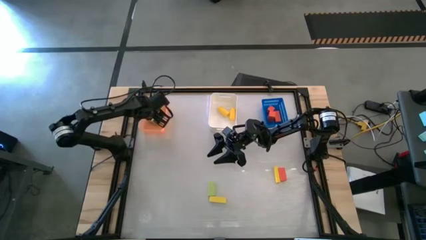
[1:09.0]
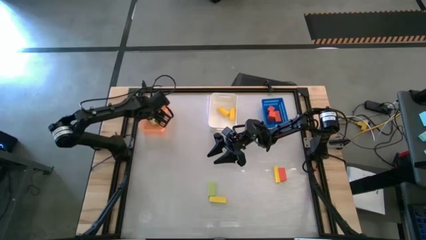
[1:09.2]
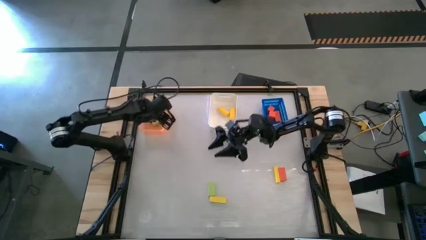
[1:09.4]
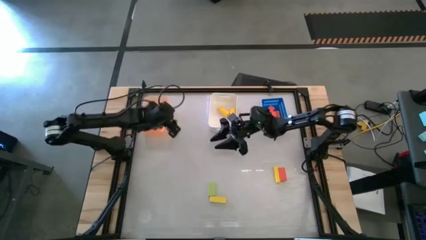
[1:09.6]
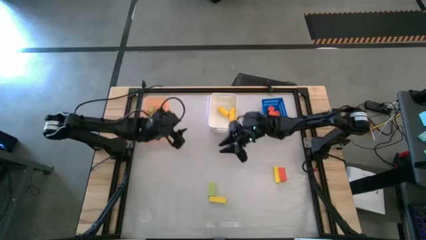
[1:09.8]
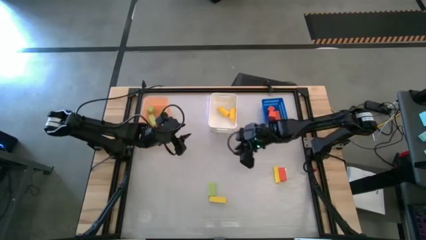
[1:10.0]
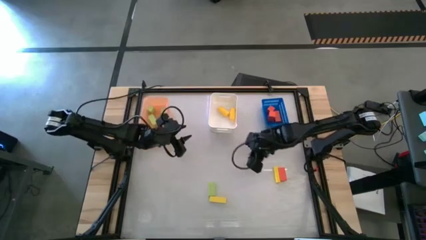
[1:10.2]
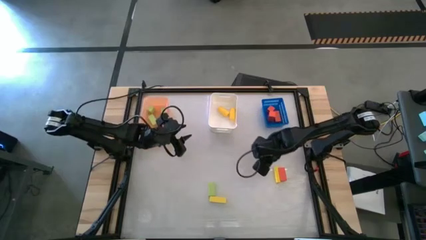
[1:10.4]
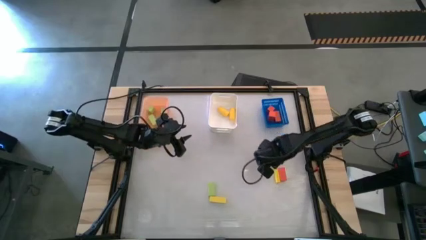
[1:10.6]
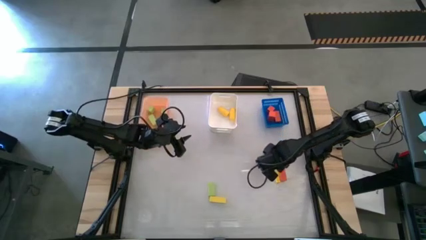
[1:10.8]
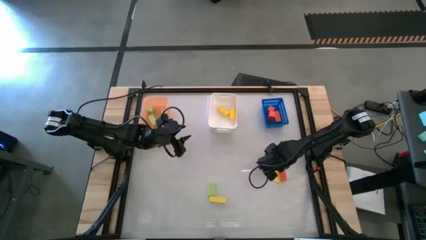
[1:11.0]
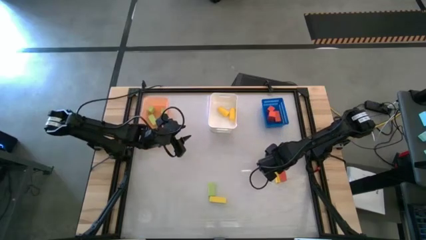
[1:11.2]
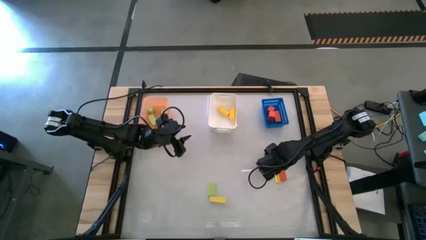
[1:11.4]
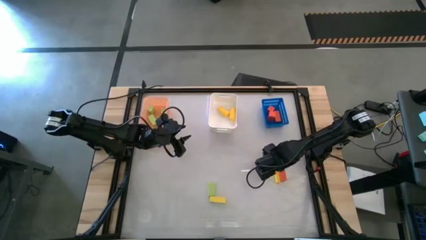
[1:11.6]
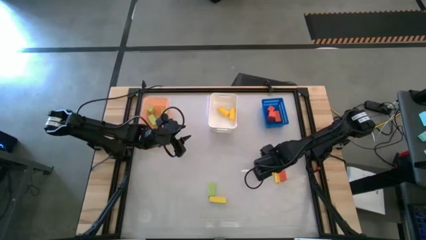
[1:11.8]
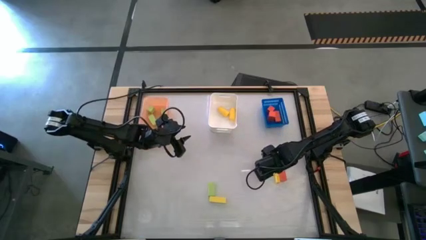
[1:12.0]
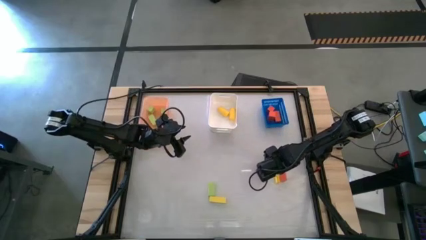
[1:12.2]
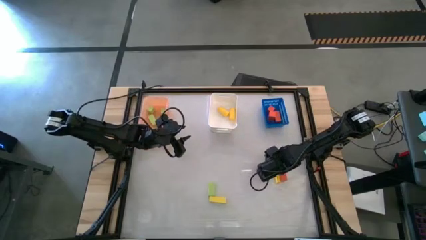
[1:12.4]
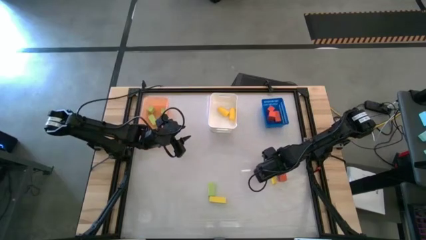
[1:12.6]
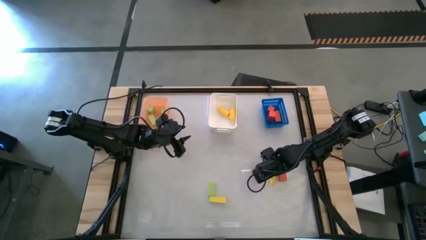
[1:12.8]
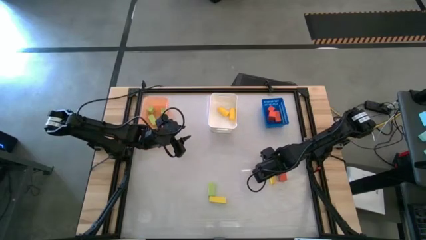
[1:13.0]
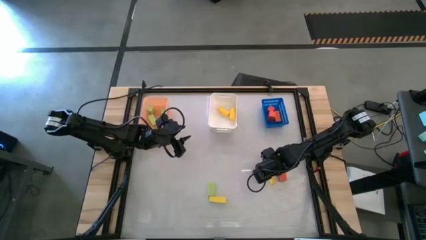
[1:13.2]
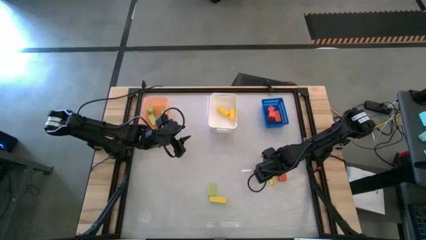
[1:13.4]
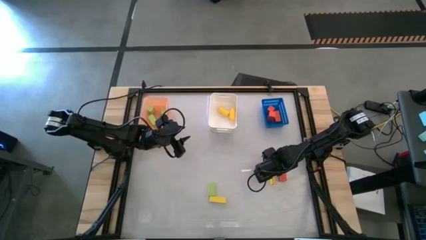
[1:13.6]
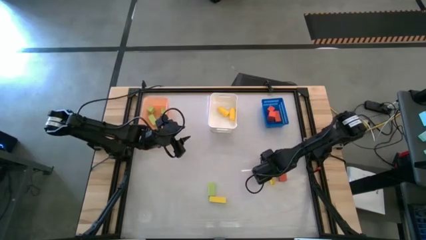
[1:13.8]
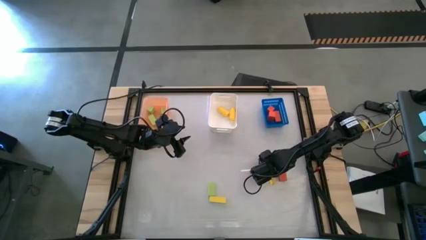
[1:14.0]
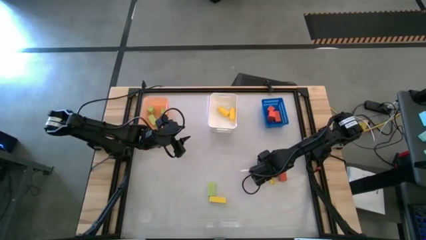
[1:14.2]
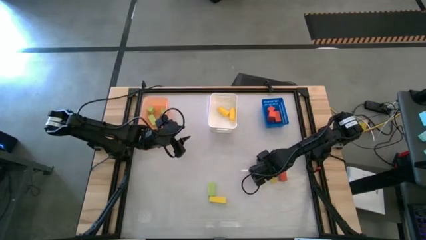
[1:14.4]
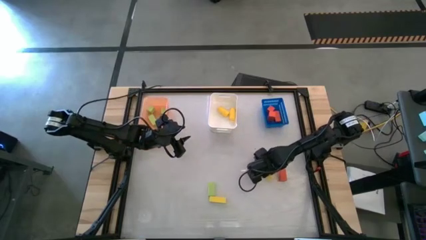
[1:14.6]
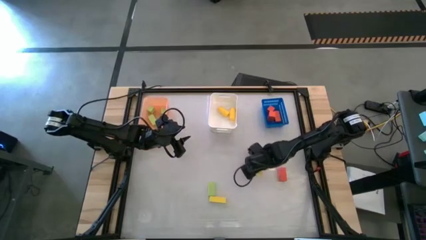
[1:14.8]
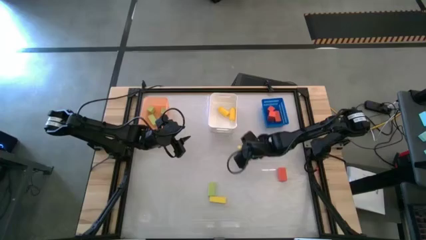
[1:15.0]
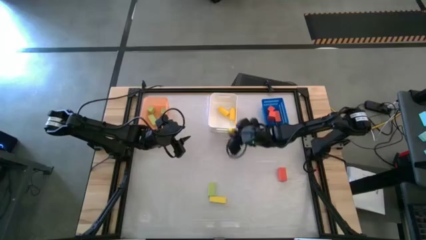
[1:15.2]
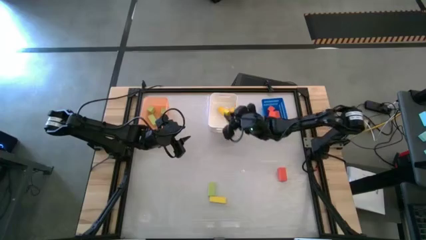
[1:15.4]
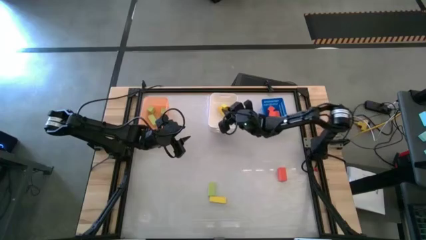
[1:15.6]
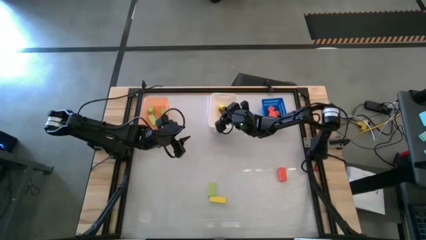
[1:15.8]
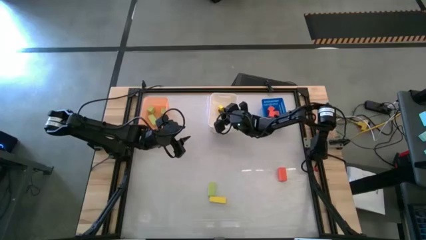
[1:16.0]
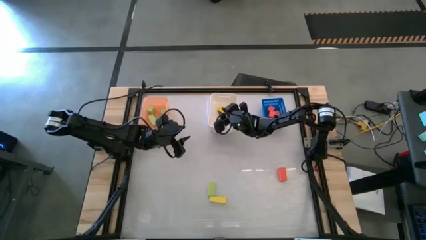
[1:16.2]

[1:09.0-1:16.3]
Task: Sort & place blocks by color
Put the top yellow block into the white bin

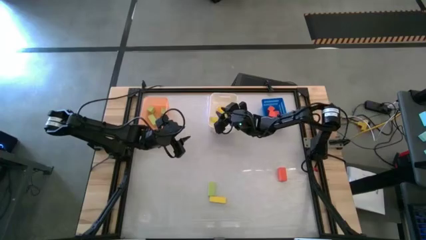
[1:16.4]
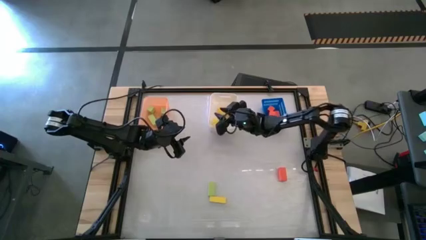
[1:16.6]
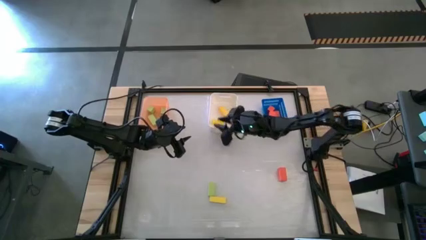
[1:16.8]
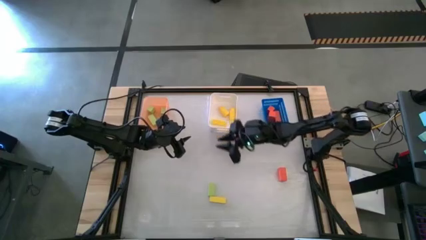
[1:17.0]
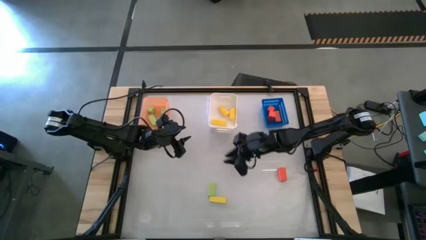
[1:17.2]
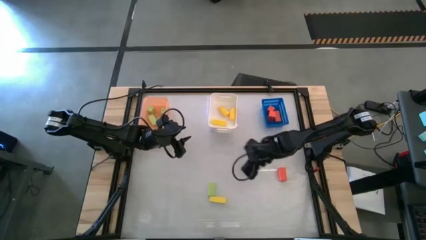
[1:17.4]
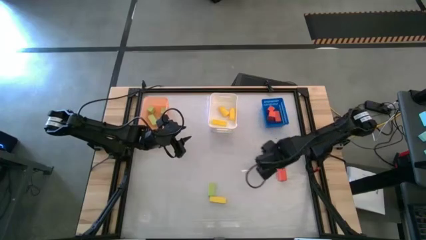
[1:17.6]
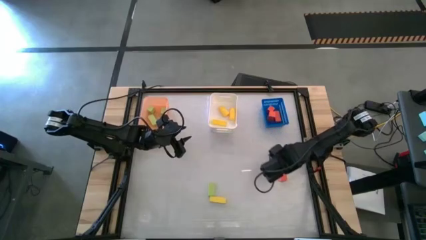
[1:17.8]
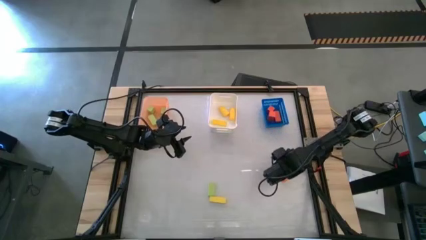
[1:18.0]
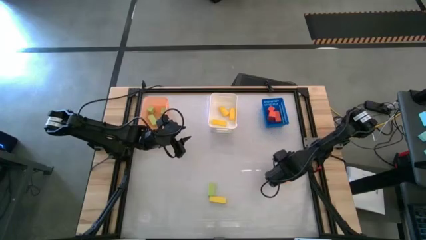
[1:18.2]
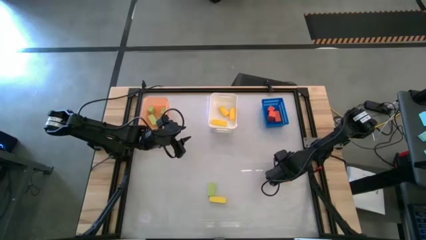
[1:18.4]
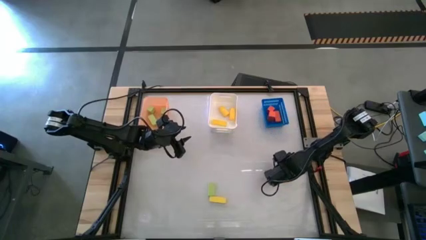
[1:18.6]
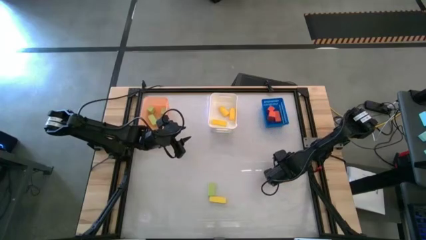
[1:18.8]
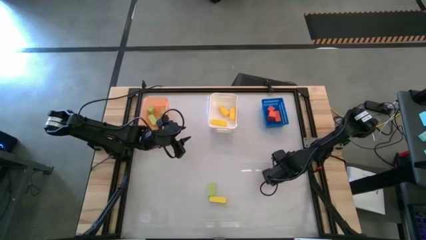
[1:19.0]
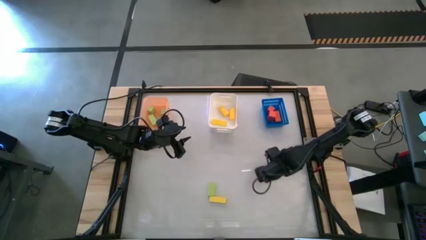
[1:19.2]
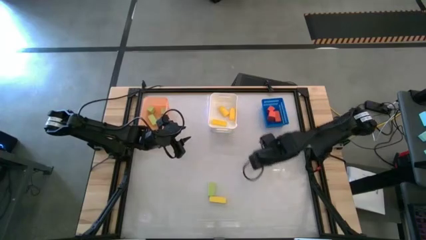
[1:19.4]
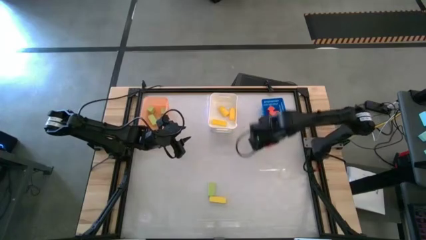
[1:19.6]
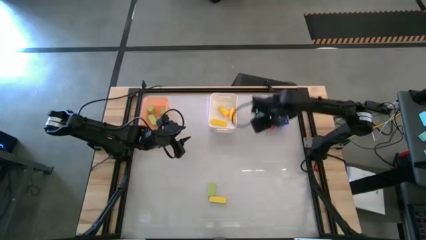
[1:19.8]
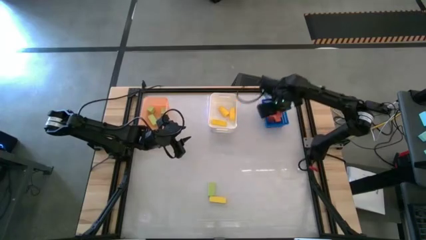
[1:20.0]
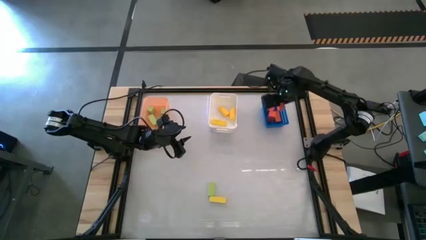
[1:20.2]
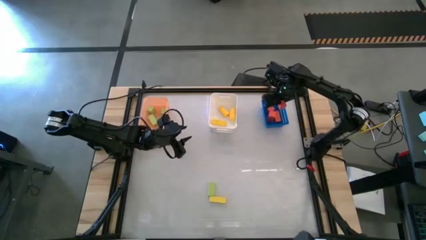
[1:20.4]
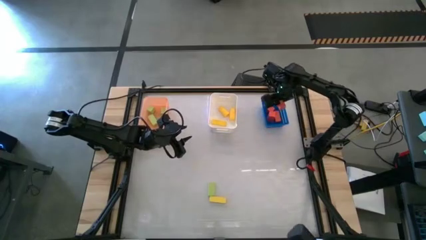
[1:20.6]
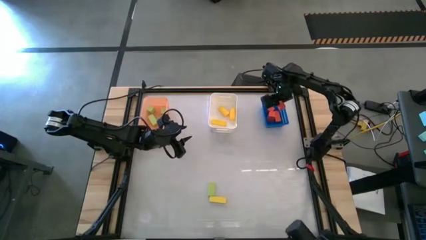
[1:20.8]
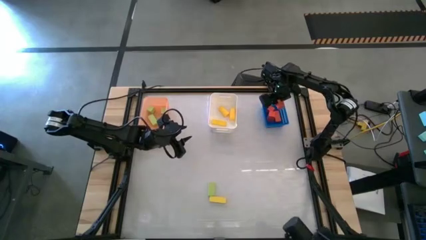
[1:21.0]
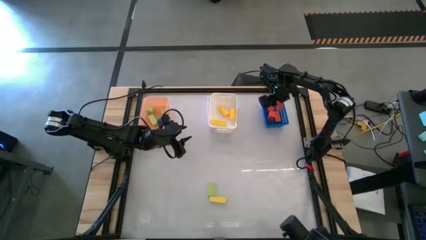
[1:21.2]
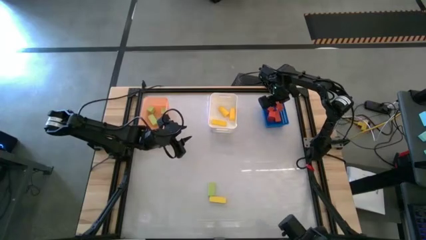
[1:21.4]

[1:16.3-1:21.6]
Put the orange block into the blue bin

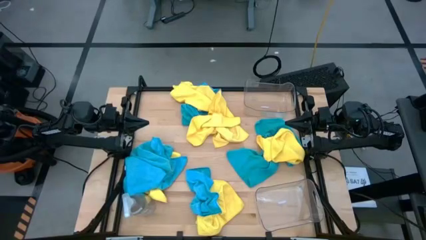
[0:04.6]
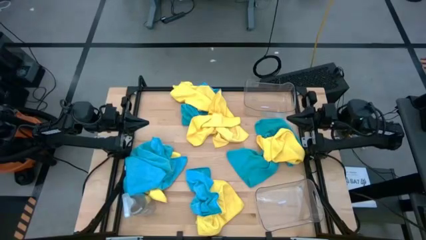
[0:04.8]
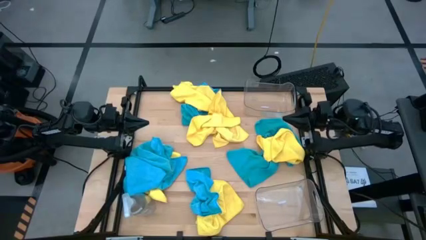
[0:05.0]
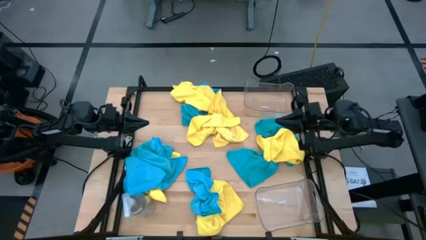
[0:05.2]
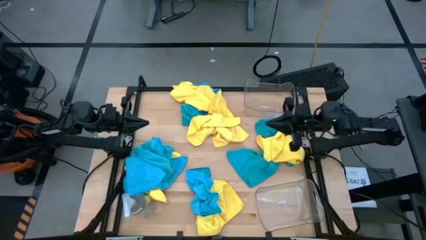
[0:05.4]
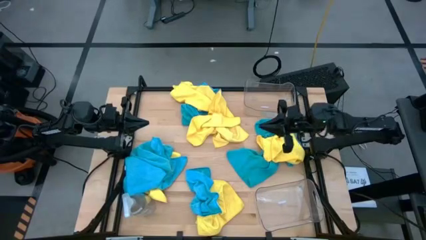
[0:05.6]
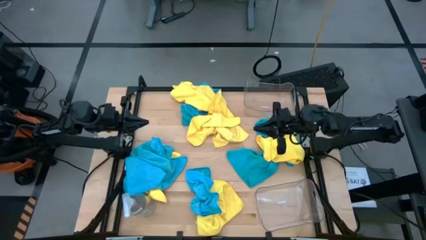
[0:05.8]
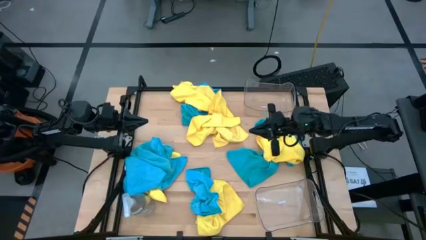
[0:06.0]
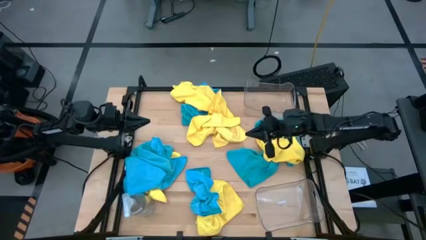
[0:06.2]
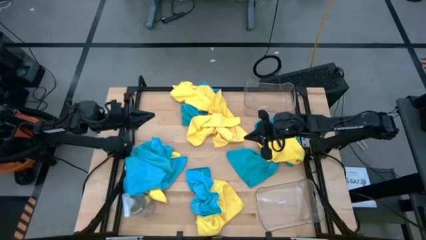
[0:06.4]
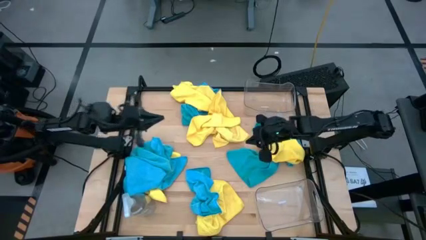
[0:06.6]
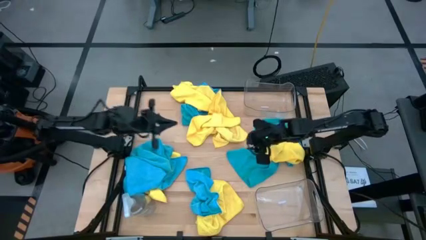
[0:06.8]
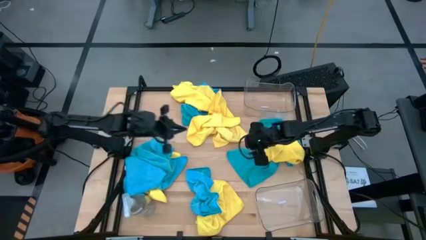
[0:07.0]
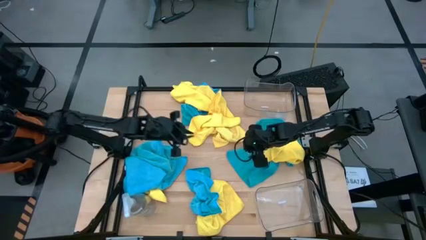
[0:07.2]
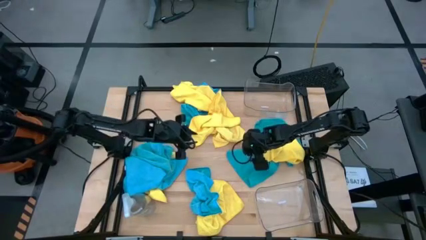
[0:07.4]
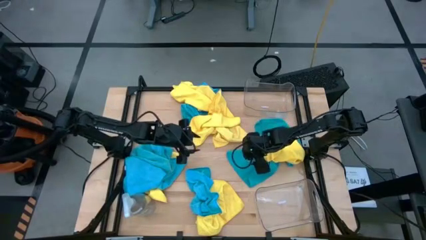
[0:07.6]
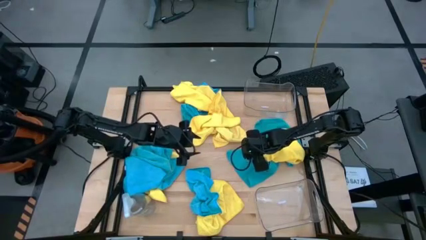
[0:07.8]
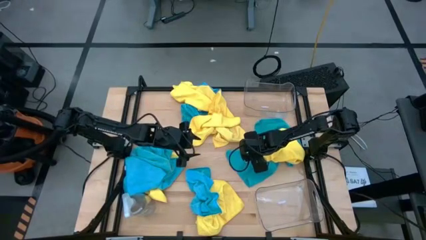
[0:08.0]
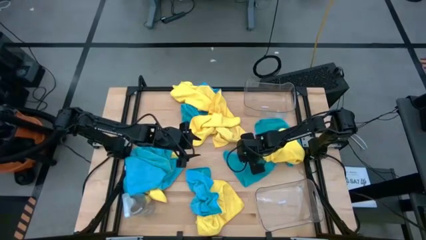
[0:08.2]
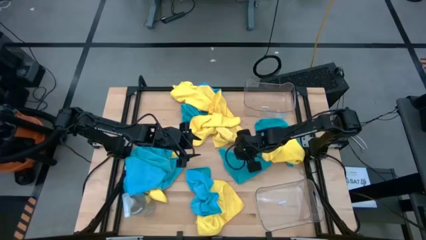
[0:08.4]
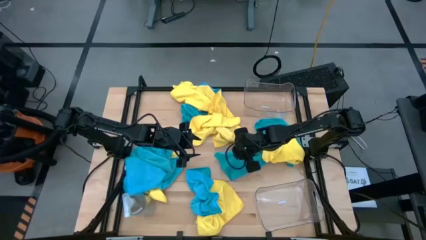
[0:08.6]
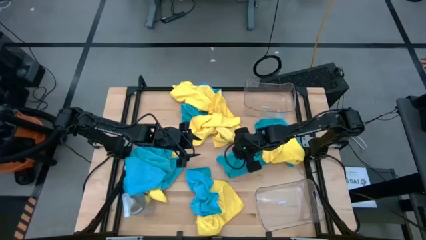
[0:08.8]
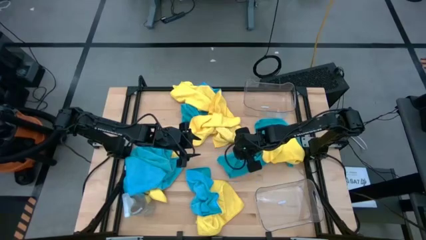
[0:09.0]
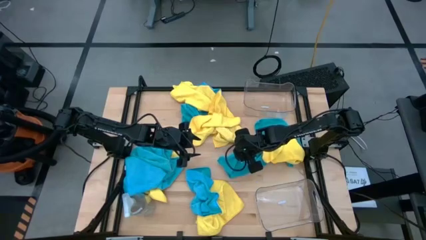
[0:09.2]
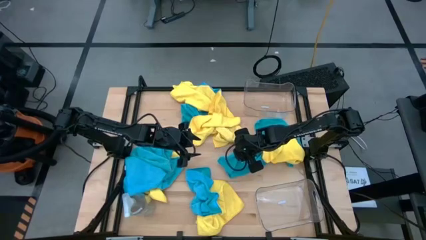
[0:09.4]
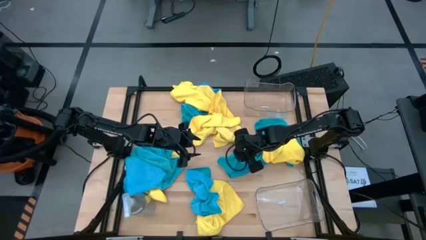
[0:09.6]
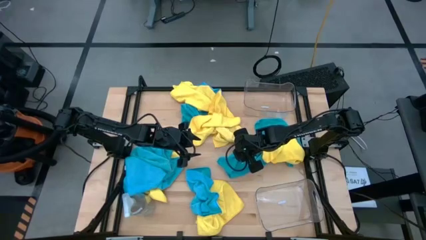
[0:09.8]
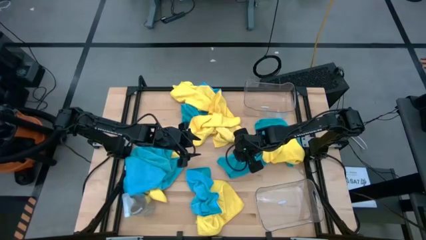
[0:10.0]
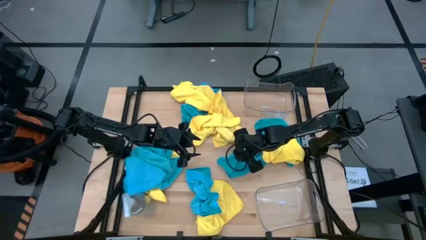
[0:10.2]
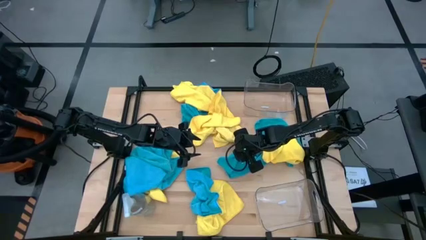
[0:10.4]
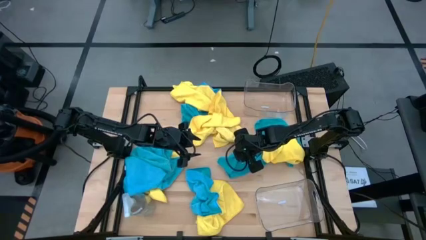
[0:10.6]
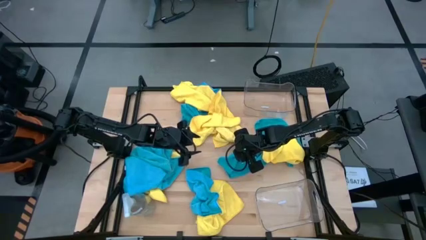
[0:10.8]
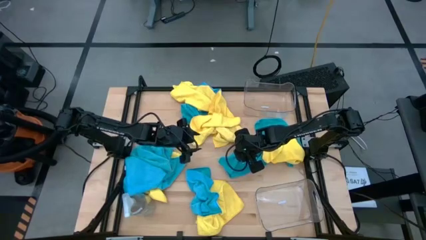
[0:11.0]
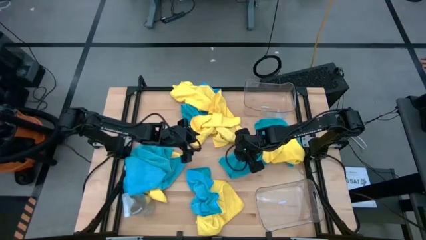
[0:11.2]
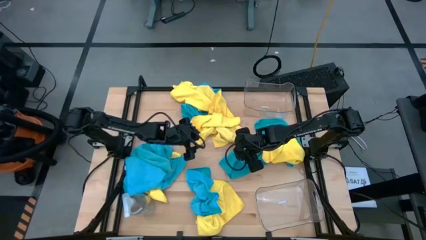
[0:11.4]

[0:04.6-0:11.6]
Task: Sort microfiber towel by color & place in baskets
Adjust the blue microfiber cloth
